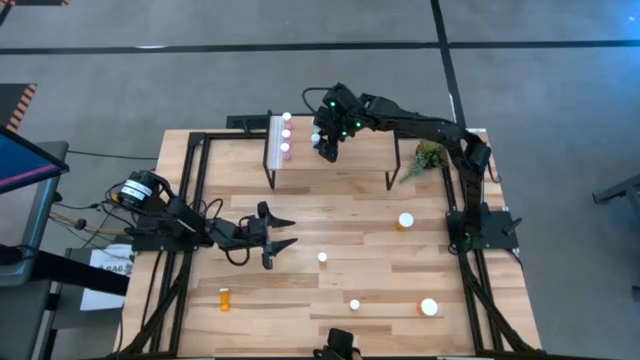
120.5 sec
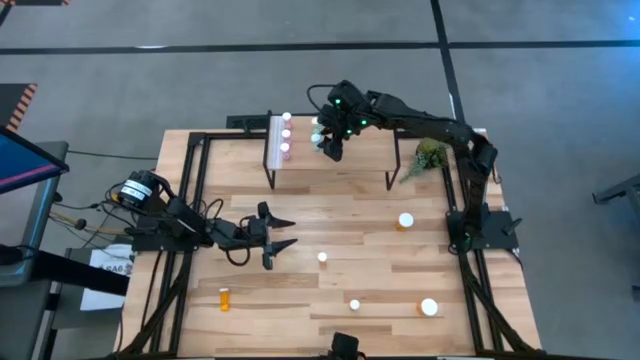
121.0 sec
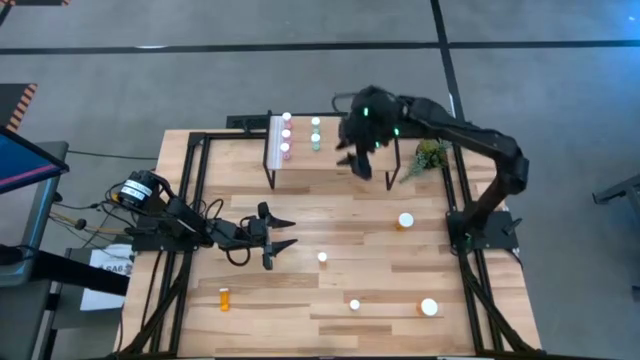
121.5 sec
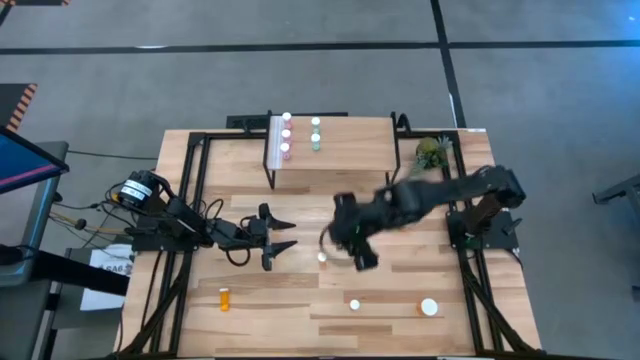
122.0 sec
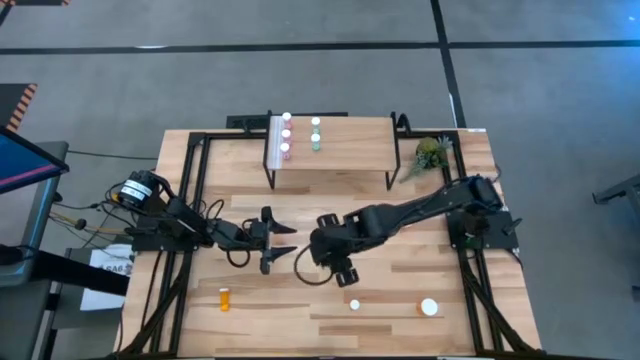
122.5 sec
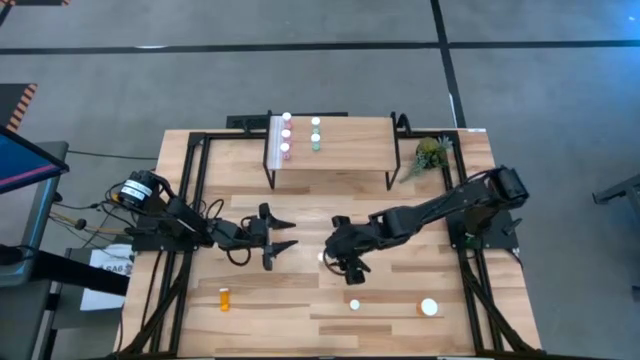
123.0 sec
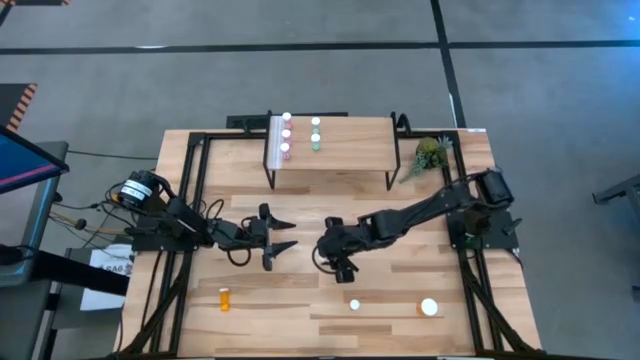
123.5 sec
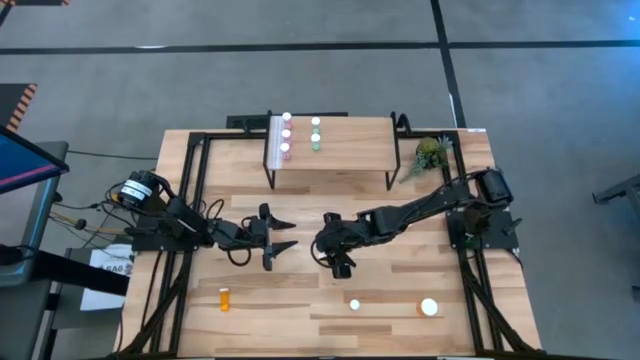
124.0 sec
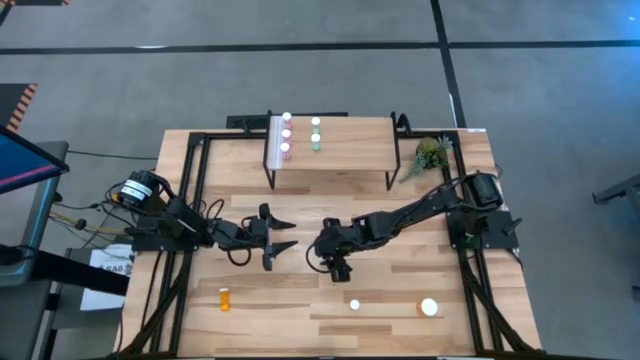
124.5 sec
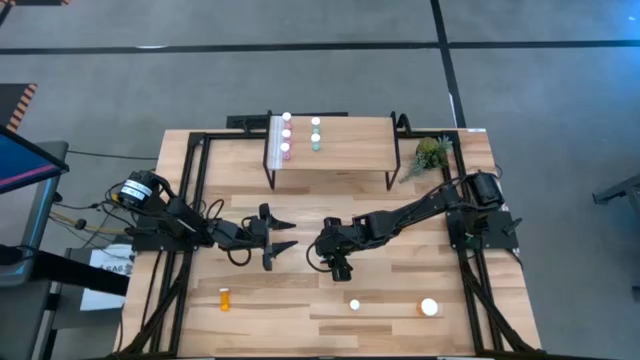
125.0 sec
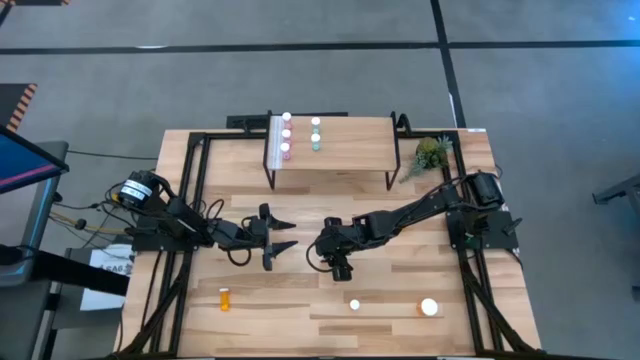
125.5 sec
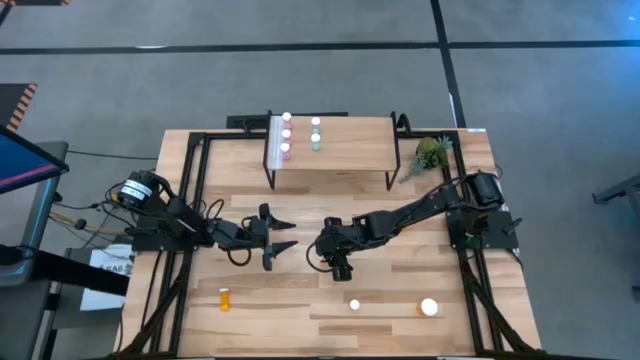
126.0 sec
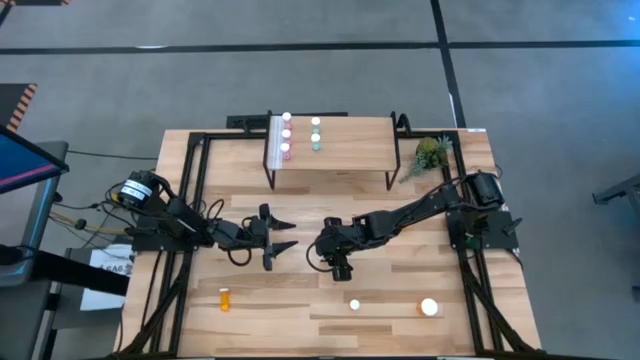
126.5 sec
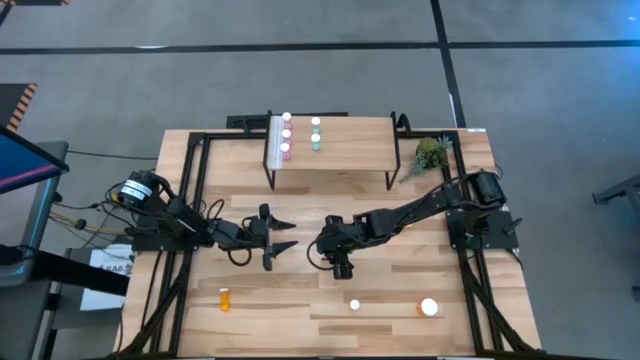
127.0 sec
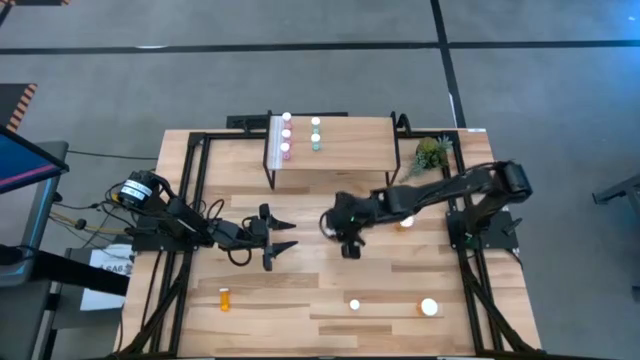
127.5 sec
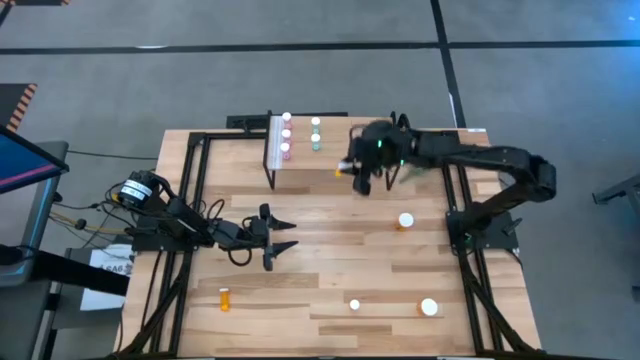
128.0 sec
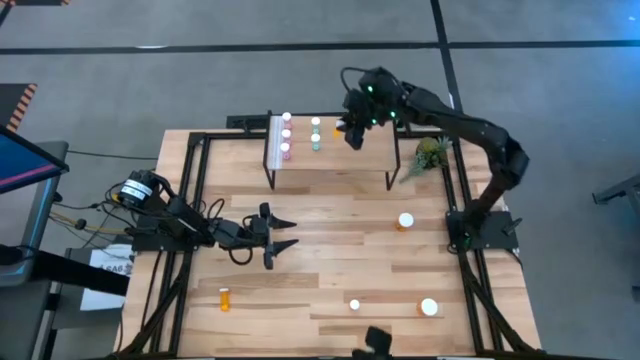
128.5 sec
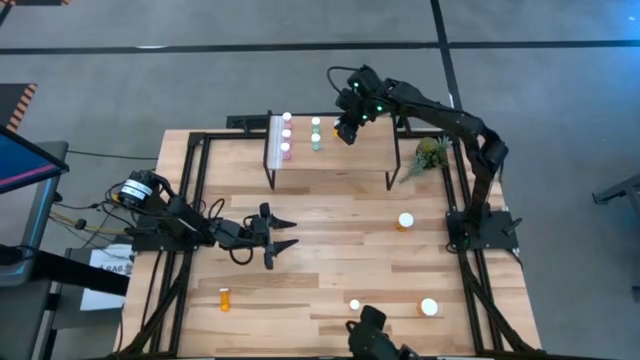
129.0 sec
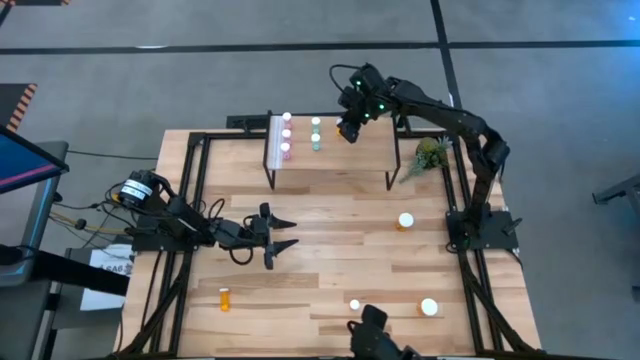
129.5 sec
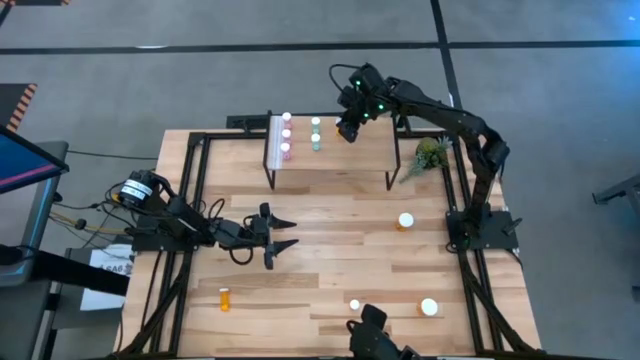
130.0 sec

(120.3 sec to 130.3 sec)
Task: Pick and place medicine bottles onto shelf by color
Put the top small orange pill bottle on the shelf

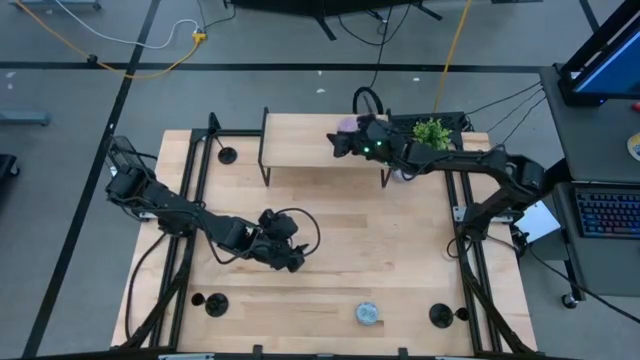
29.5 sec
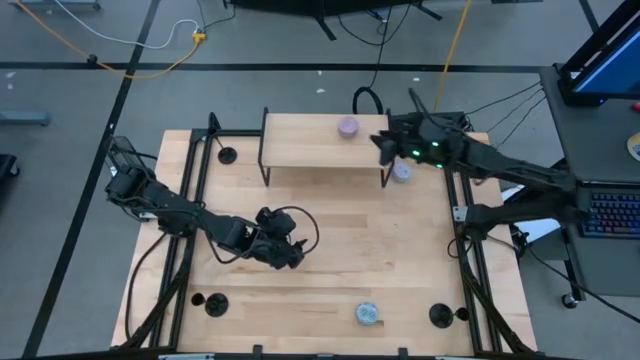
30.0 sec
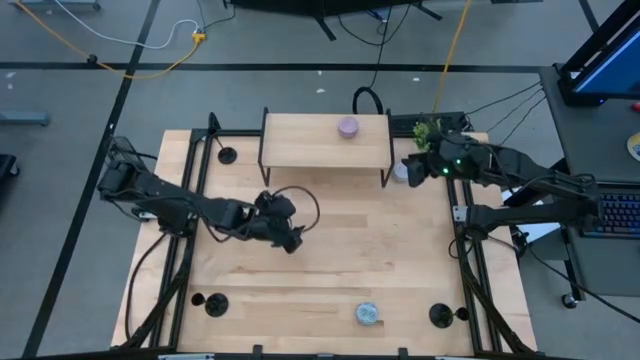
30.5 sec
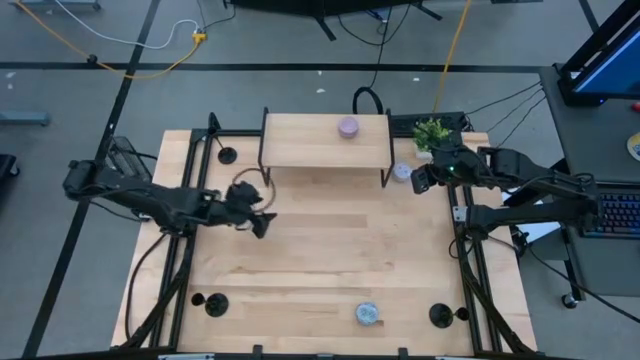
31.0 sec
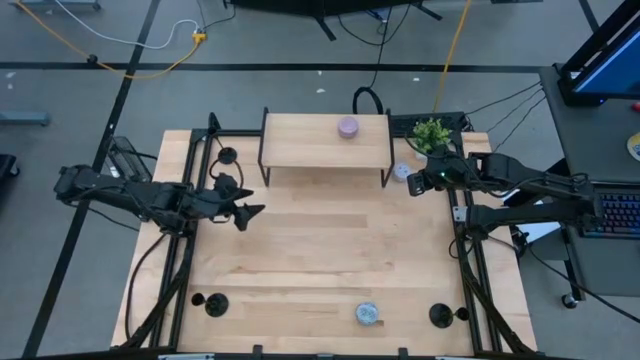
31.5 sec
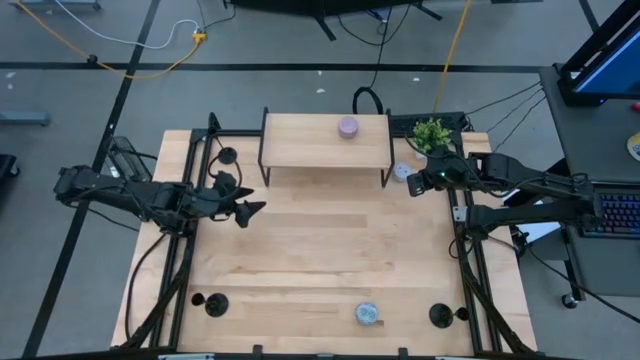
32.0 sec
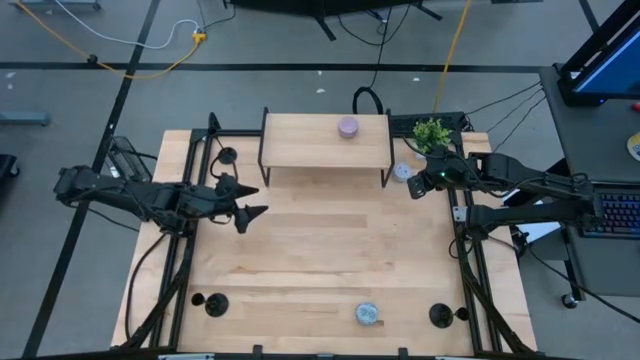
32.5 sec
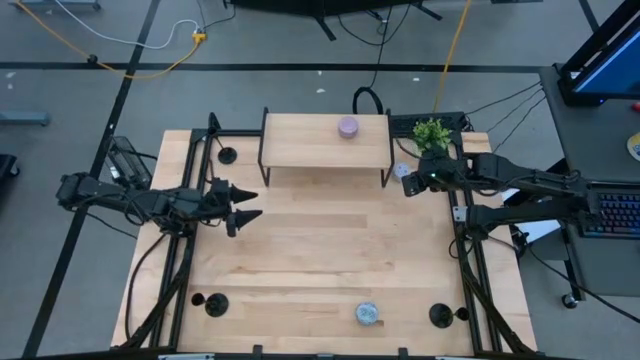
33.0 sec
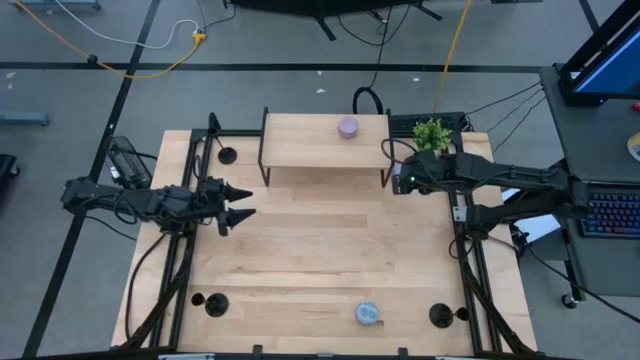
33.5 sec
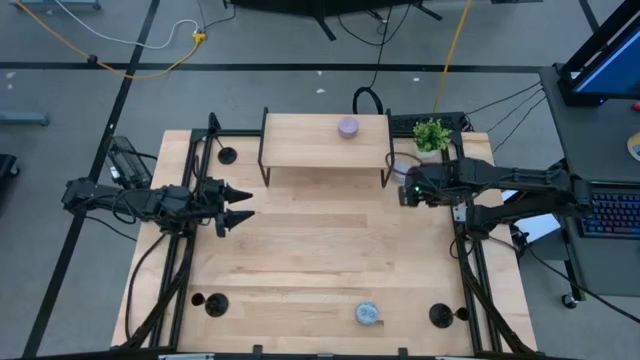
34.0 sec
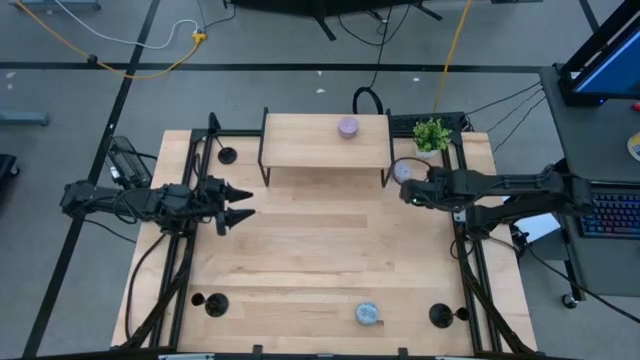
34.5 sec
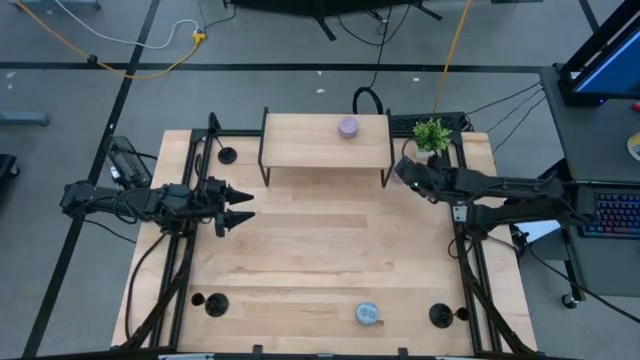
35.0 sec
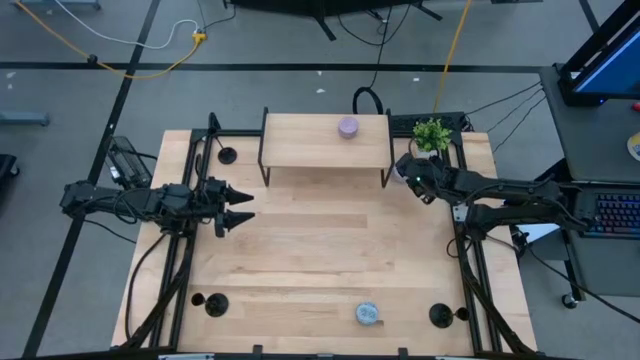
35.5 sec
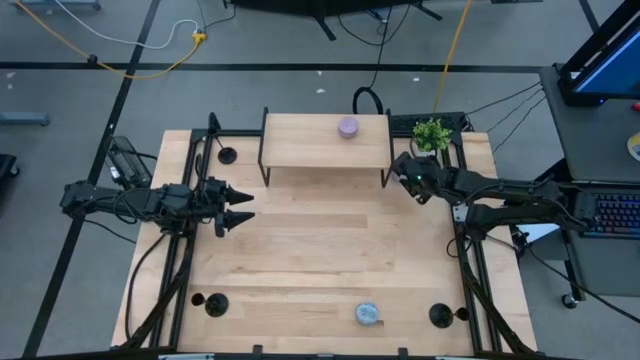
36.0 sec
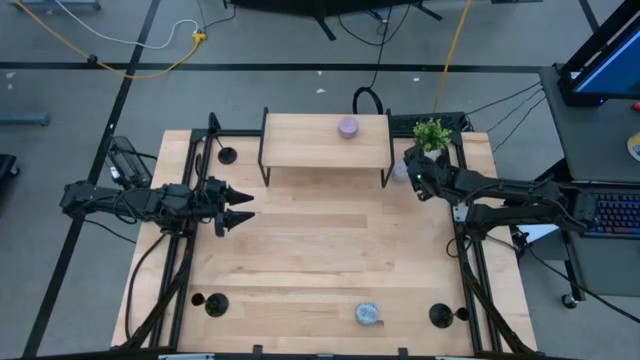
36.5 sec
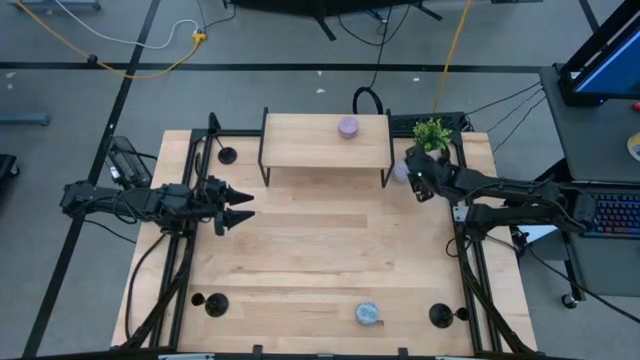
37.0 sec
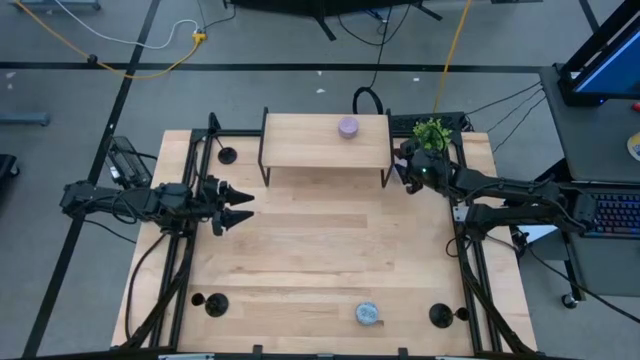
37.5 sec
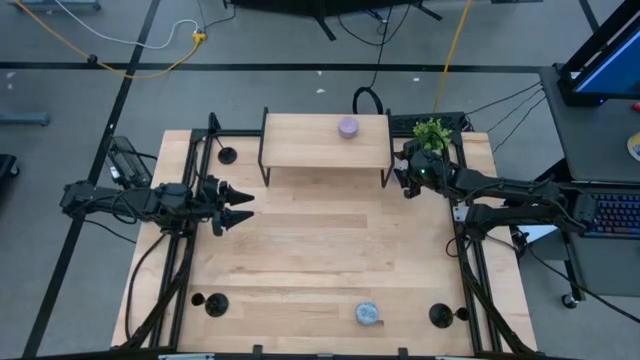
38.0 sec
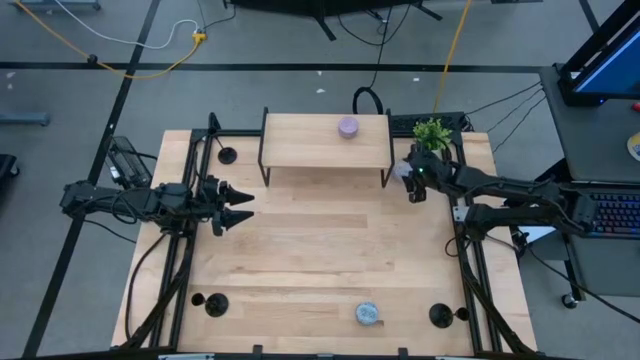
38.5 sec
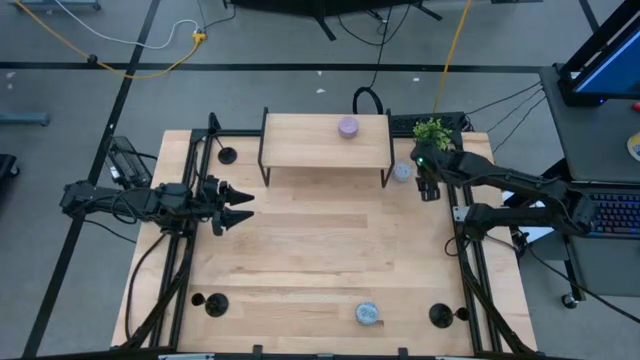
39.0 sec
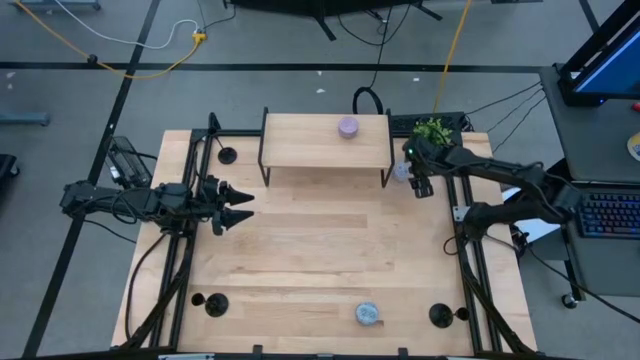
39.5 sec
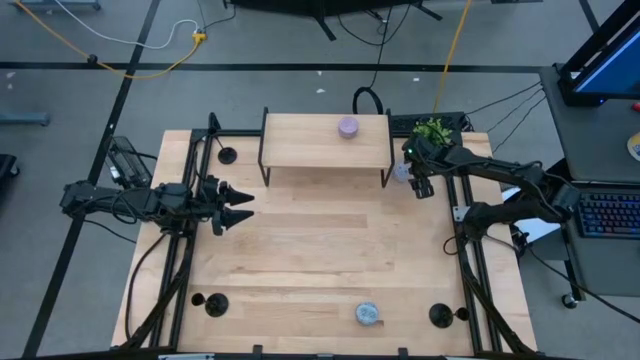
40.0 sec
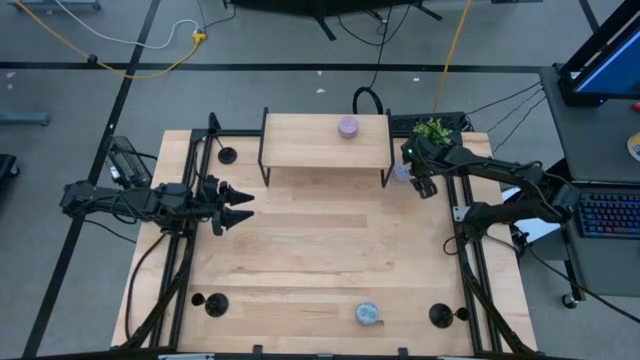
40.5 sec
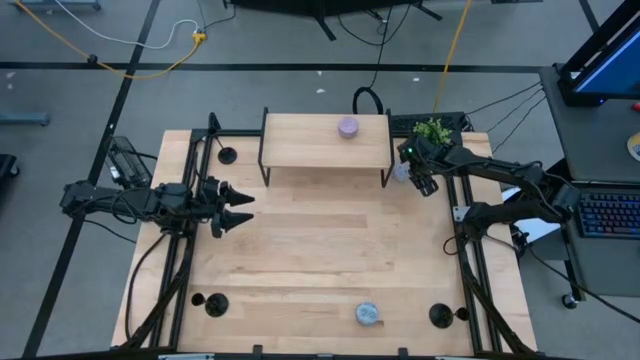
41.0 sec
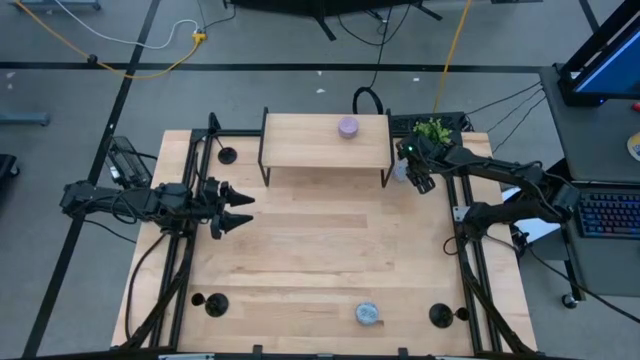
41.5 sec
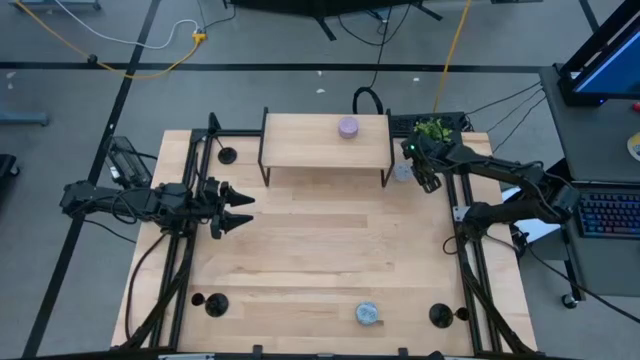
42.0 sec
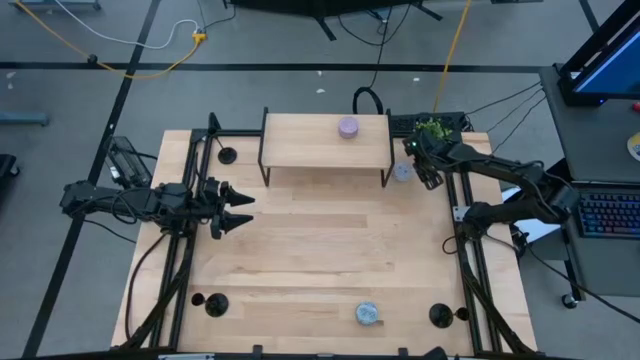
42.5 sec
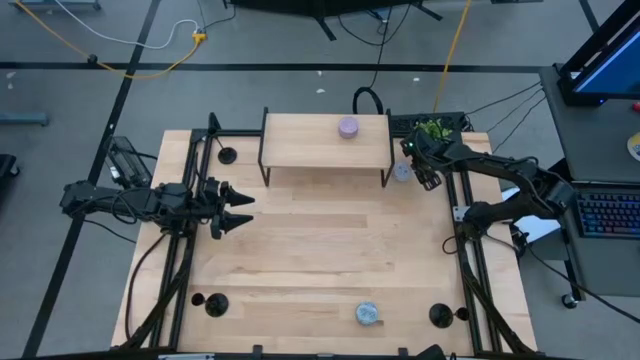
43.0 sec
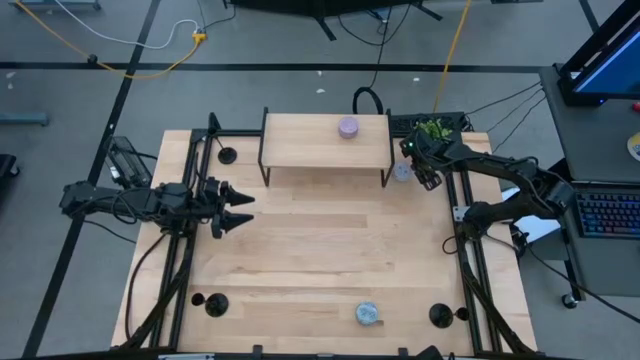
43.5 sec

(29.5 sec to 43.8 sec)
Task: Pick & Place candle stick holders
Put the white patterned scented candle on the shelf
